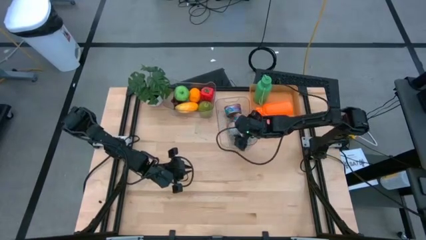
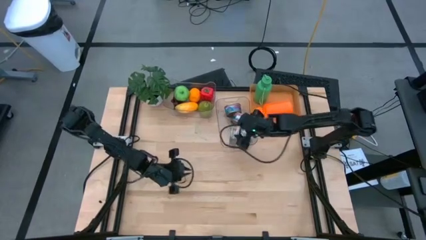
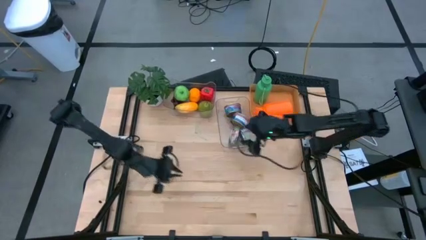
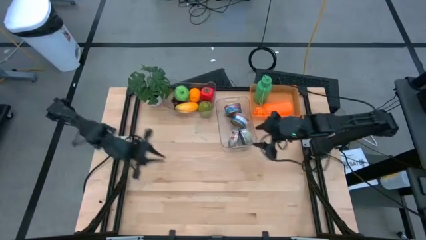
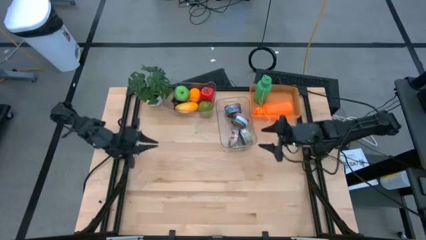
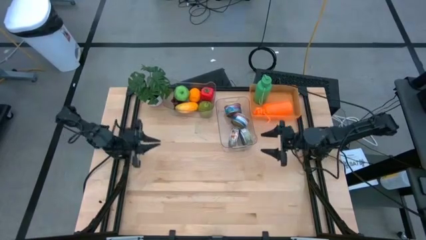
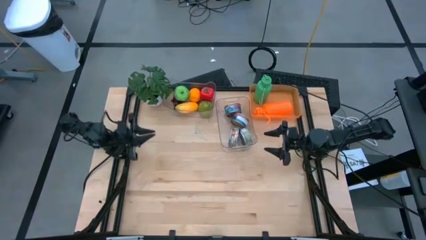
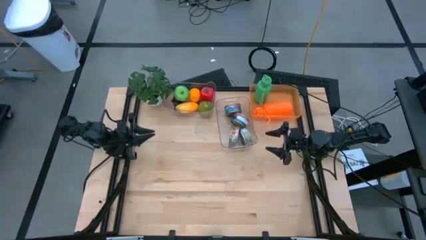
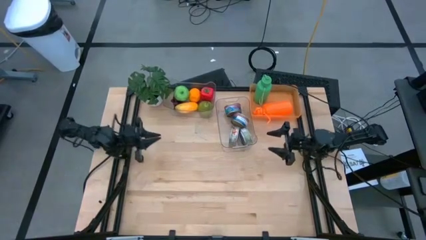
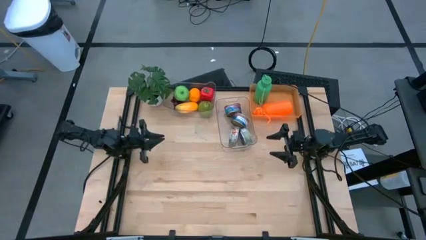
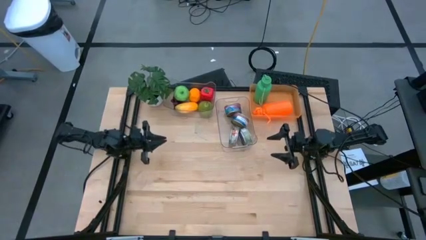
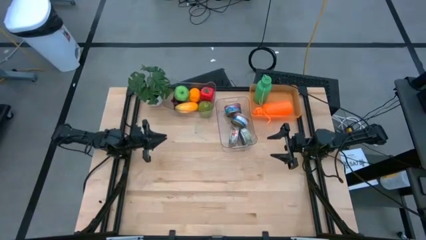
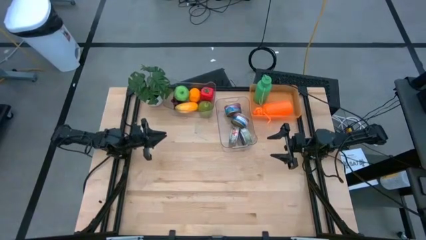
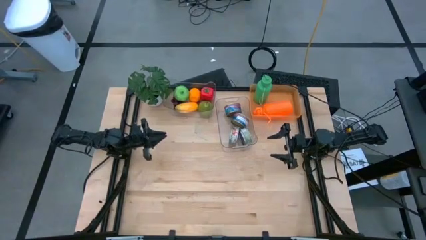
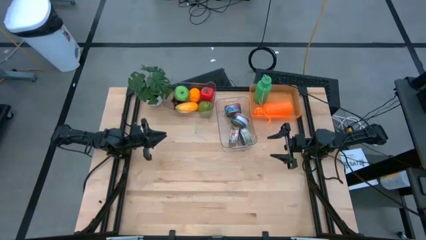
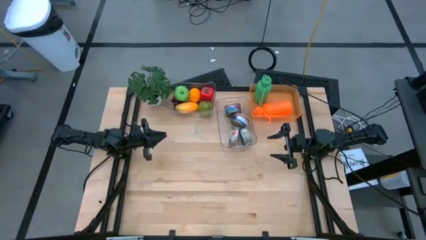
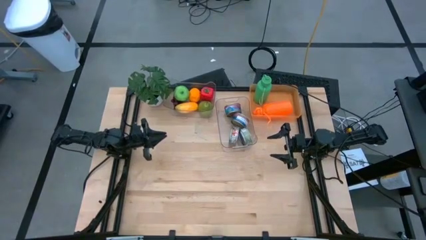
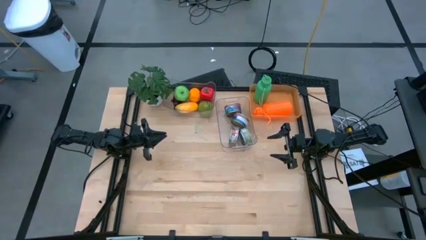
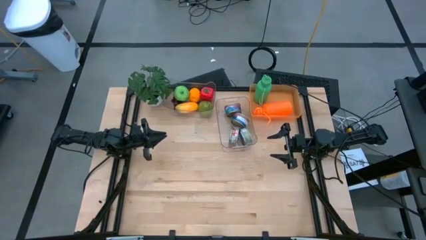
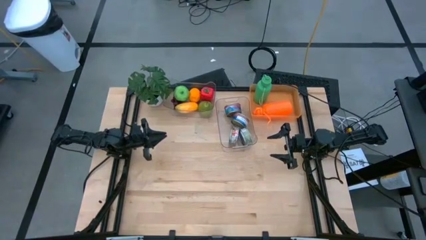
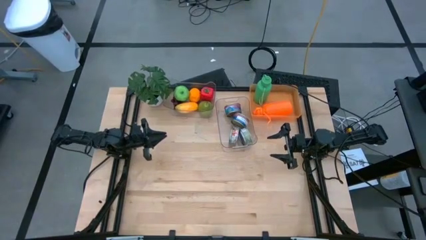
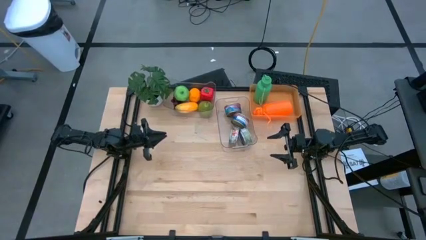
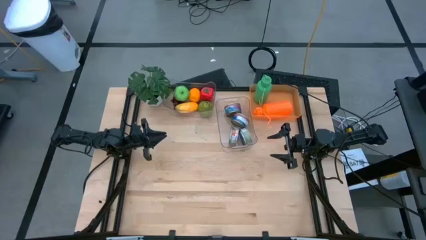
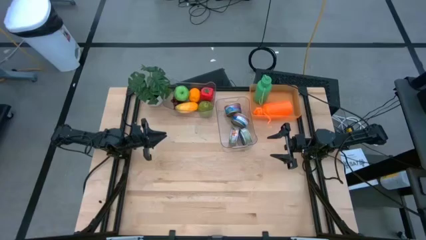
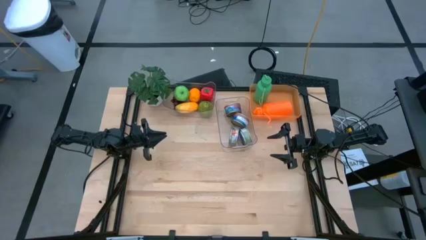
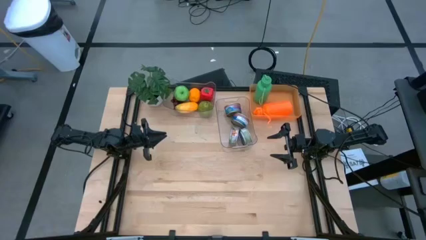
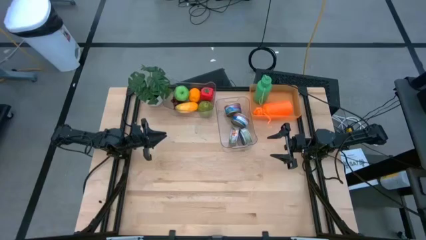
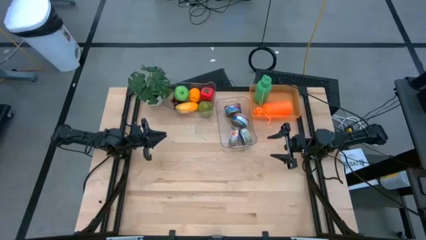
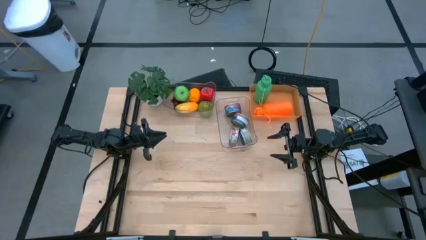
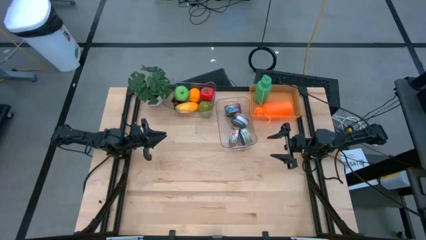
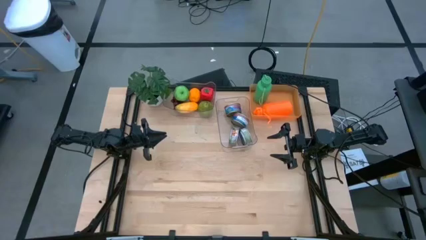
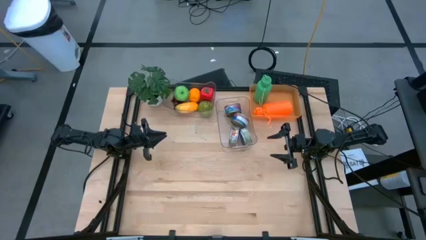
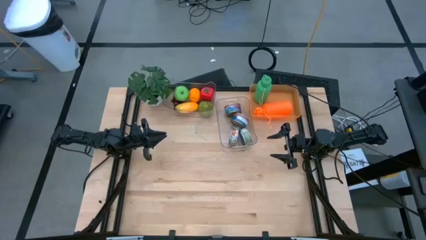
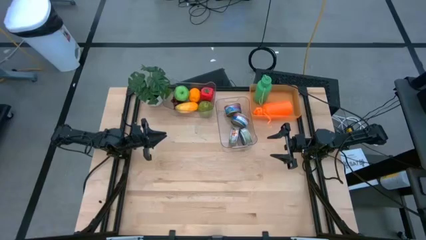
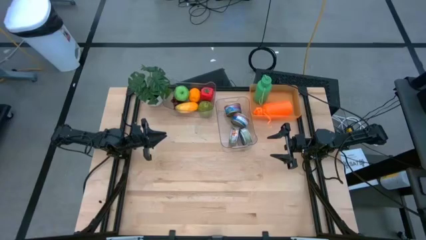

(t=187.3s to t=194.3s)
Task: Pick & Place Food Item
Return to Home Position

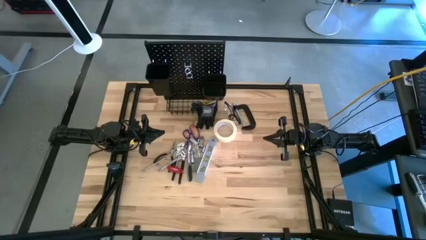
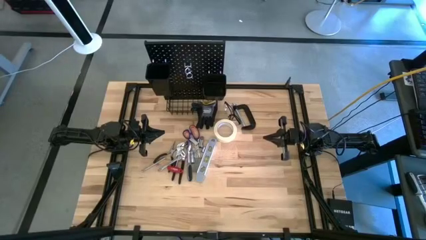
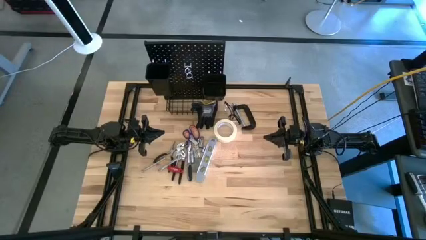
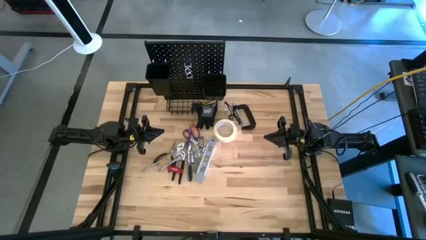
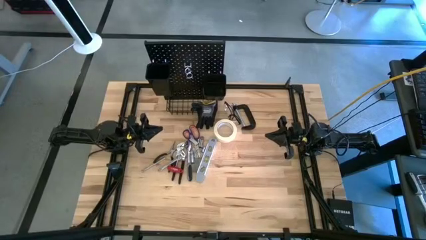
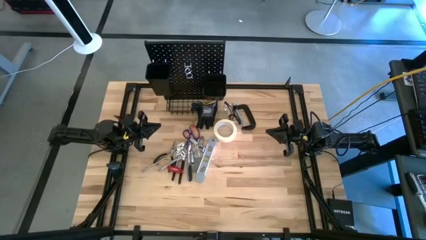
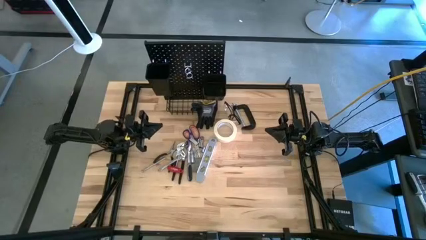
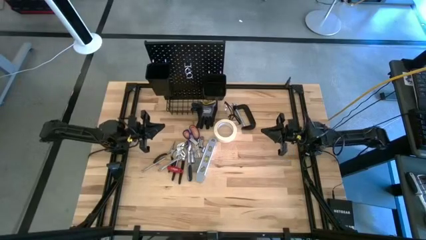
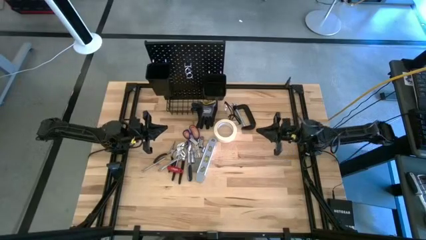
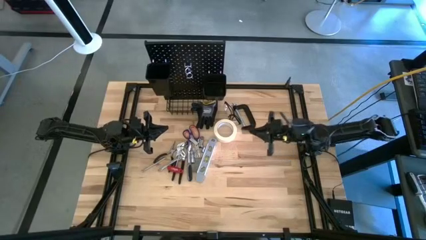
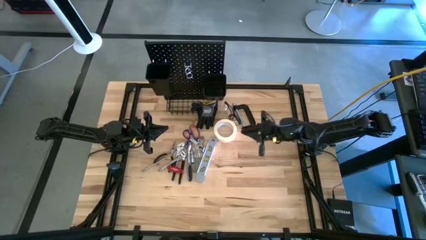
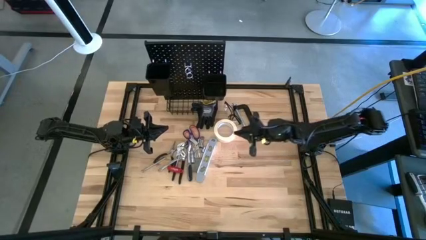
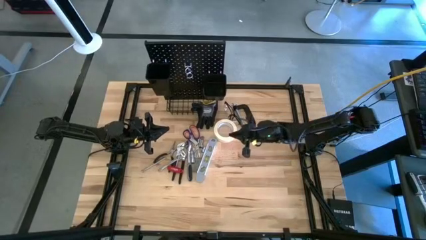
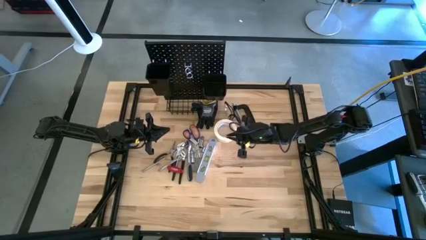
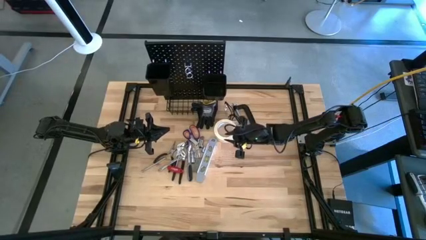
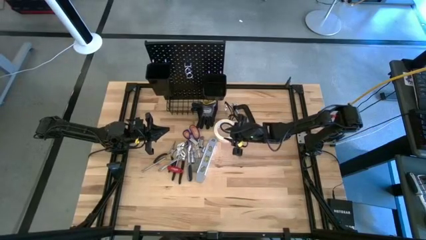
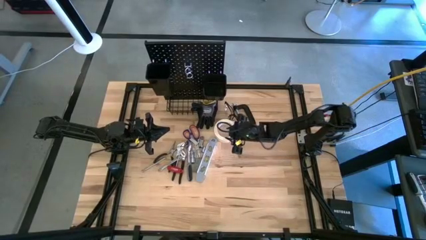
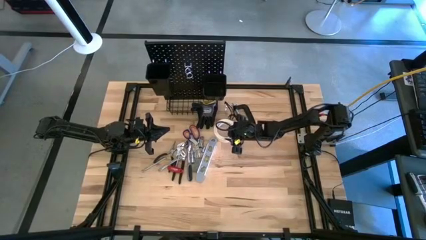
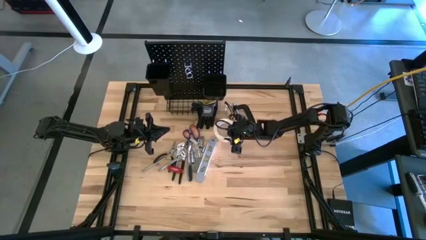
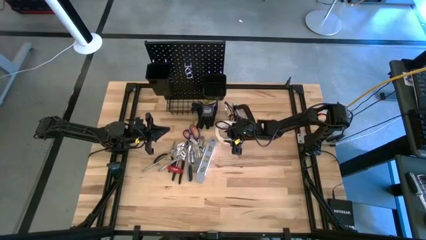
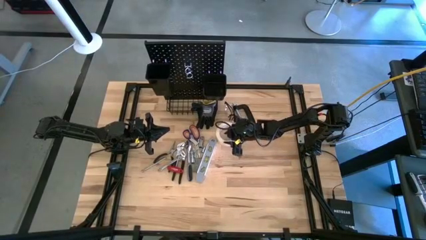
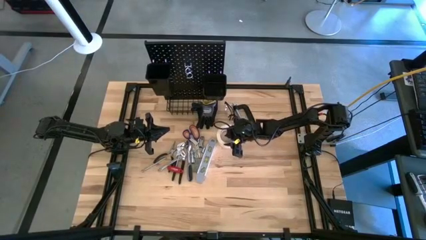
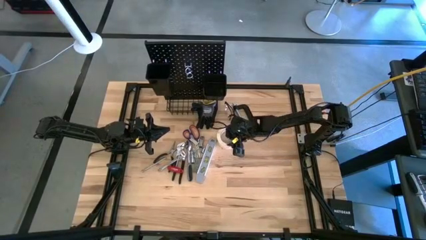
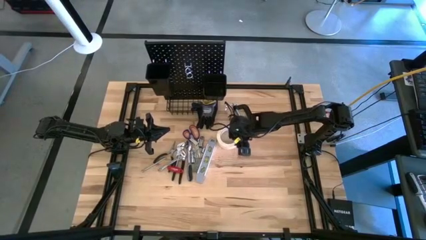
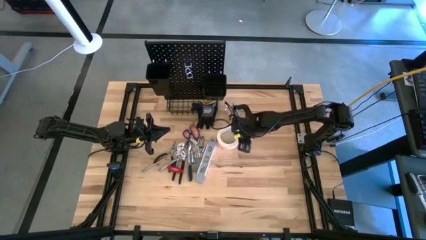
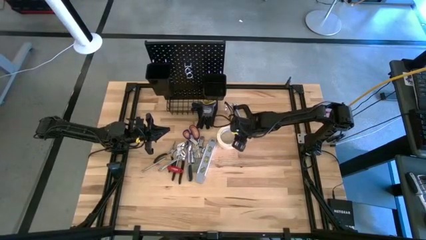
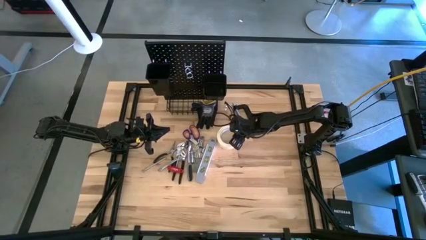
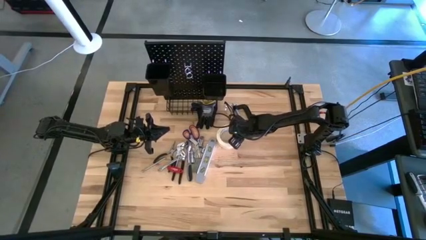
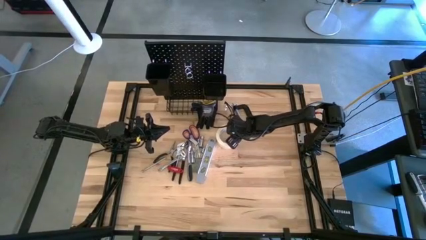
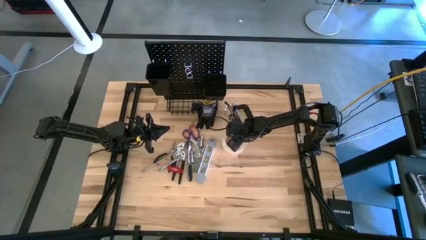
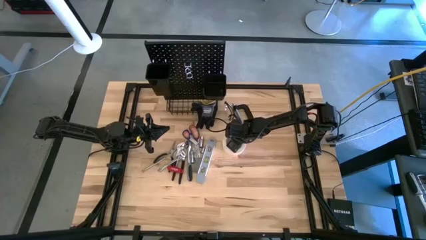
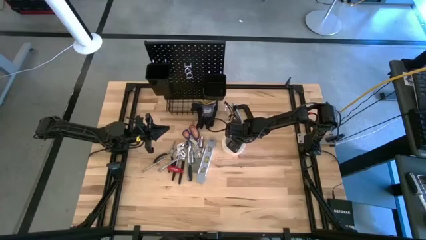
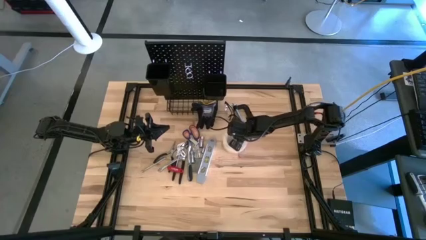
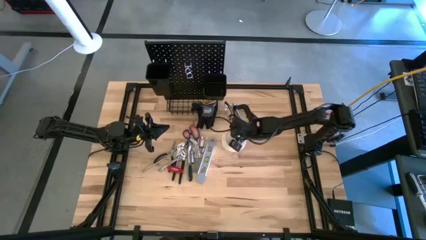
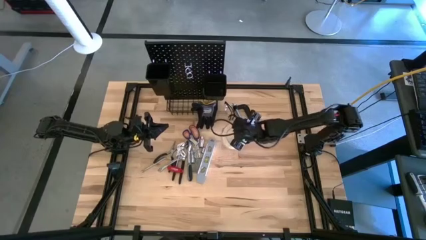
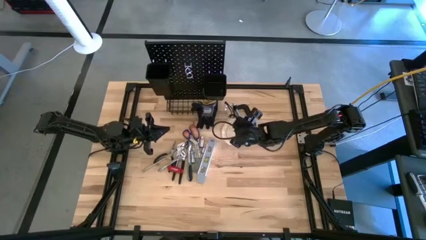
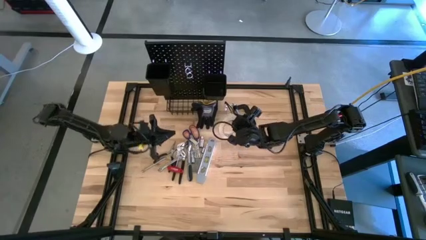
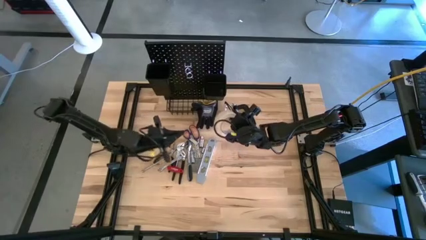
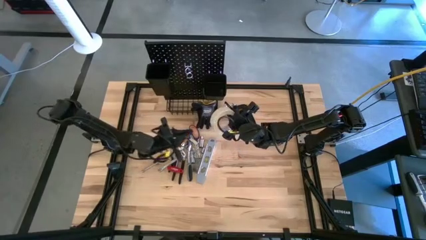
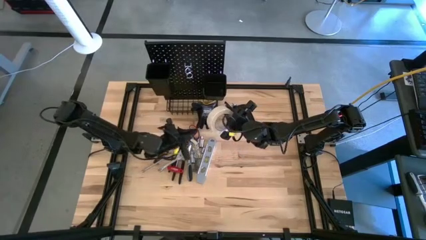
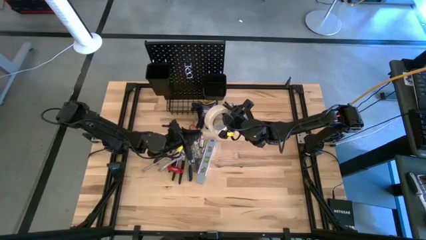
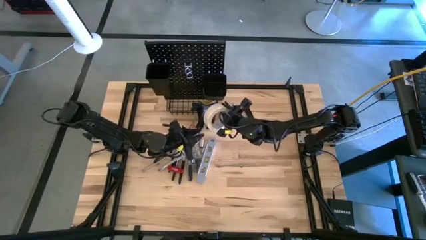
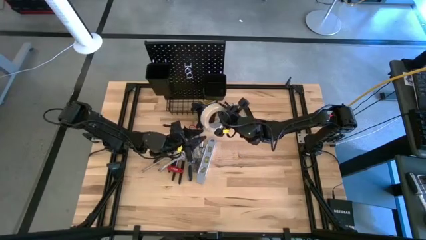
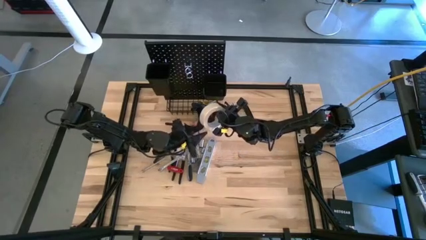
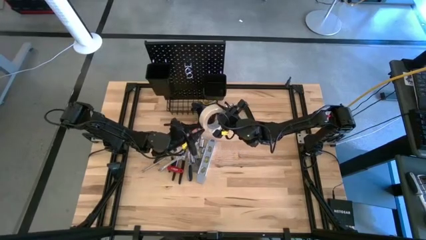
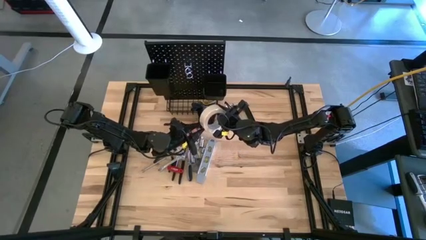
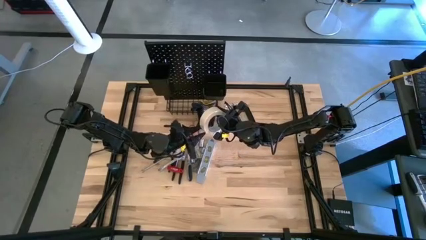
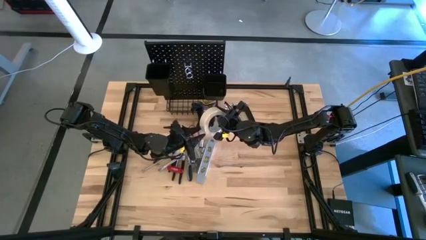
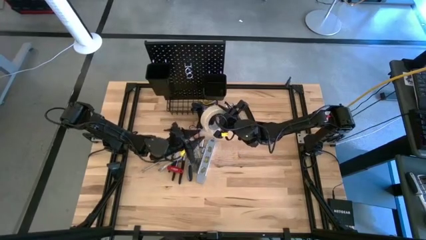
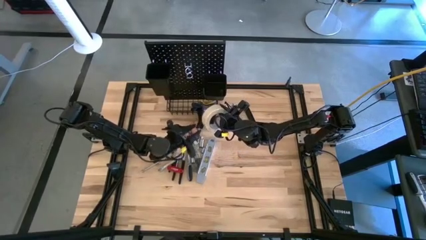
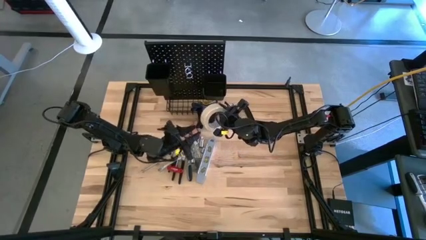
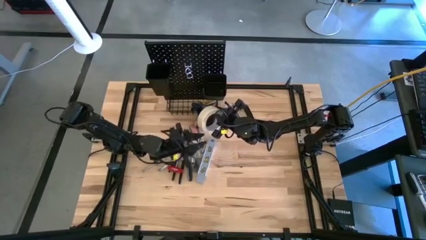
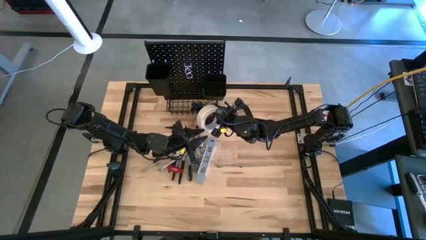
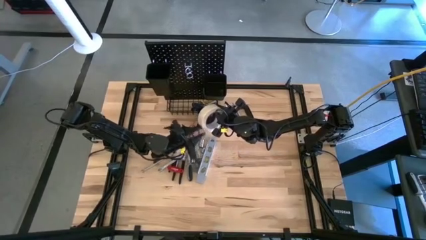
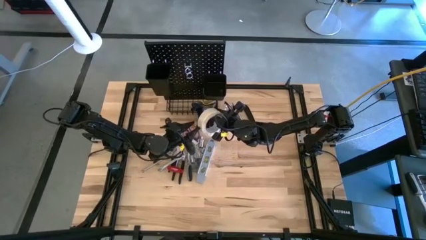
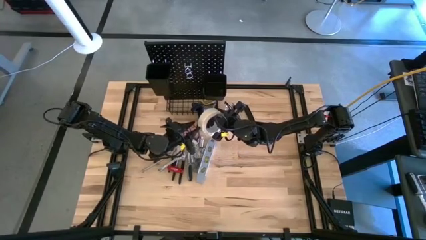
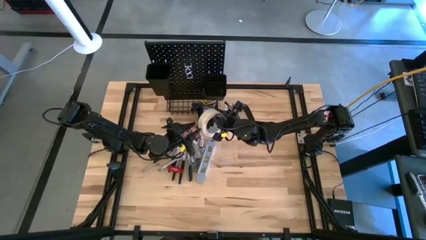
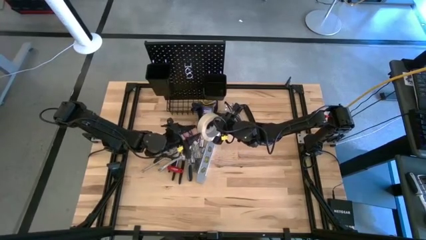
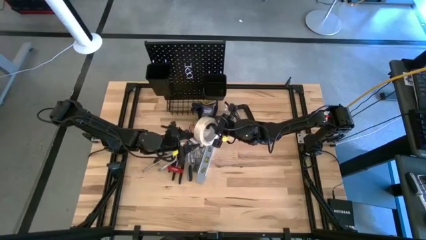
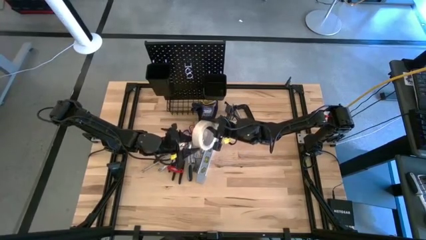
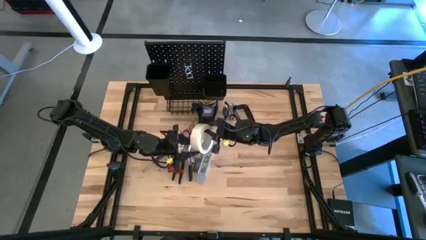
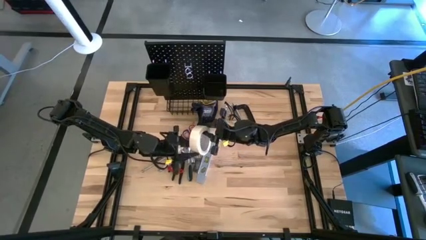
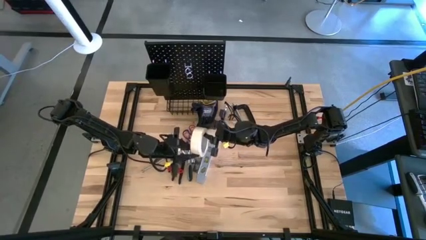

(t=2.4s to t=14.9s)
Task: Hang tools onto peg board
Put the masking tape into the wire basket on the pegboard
